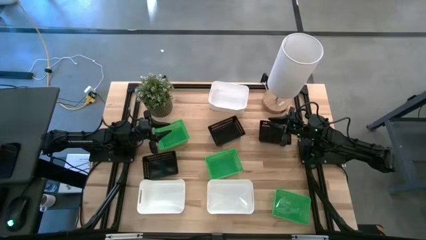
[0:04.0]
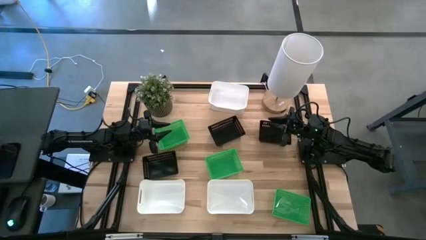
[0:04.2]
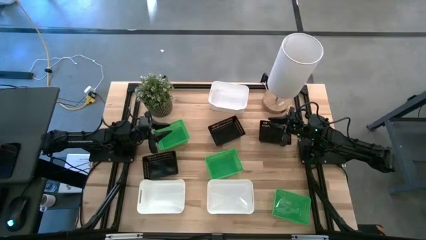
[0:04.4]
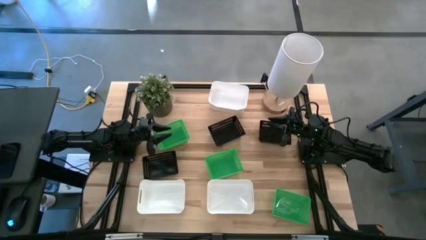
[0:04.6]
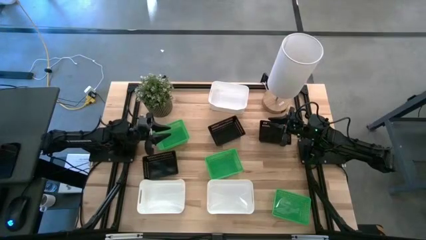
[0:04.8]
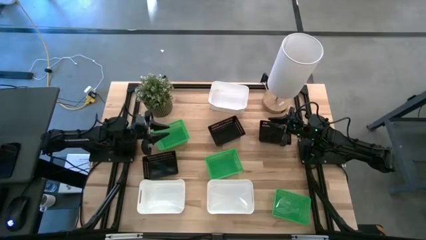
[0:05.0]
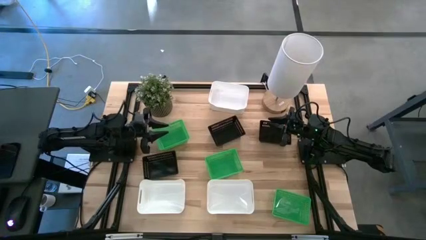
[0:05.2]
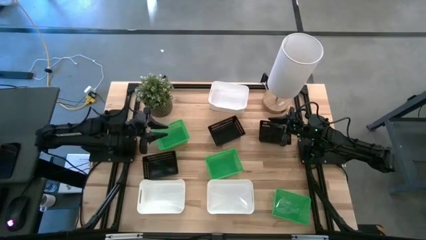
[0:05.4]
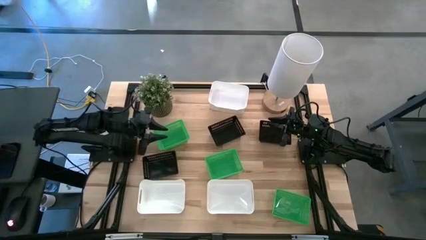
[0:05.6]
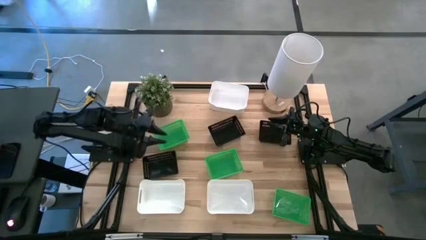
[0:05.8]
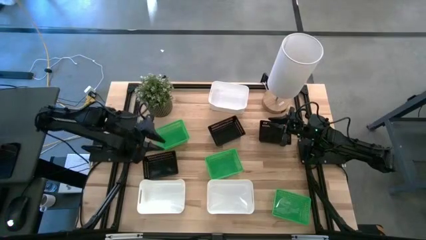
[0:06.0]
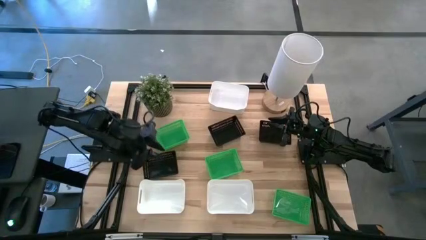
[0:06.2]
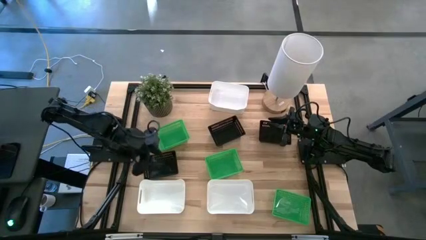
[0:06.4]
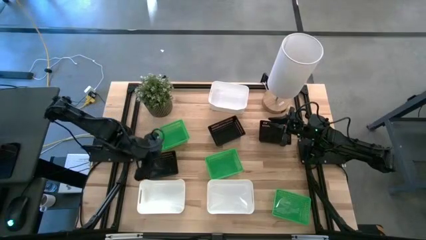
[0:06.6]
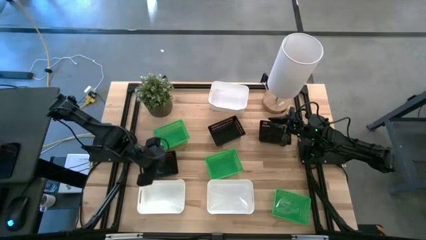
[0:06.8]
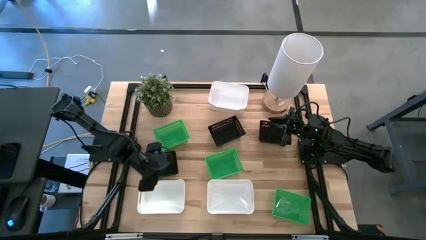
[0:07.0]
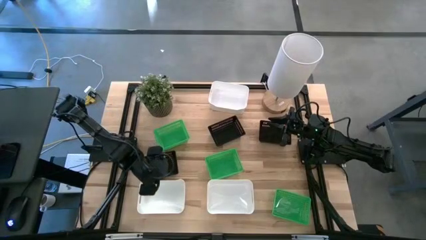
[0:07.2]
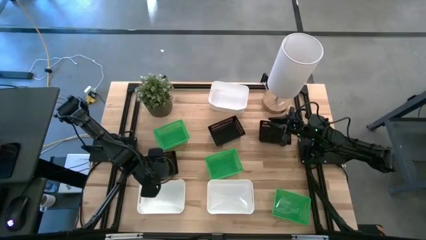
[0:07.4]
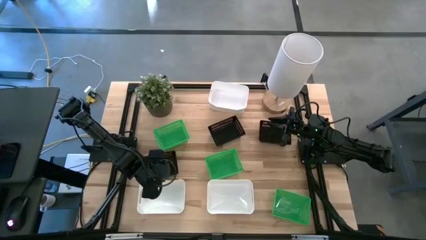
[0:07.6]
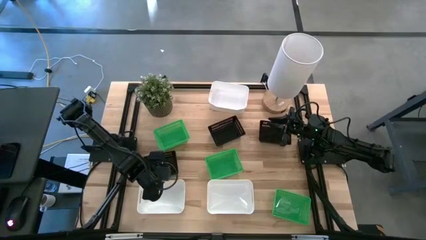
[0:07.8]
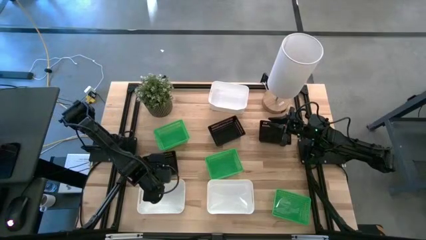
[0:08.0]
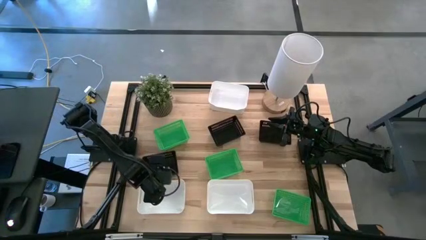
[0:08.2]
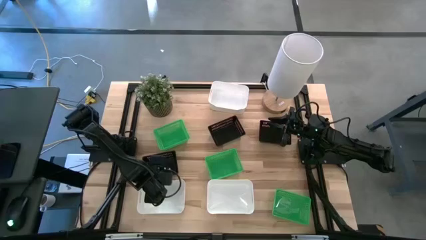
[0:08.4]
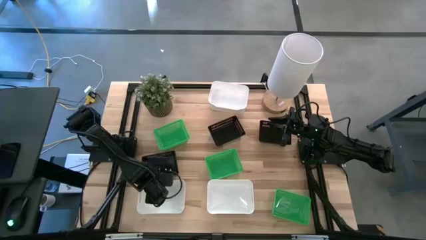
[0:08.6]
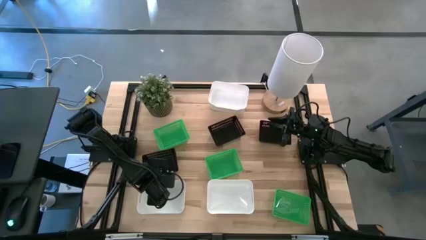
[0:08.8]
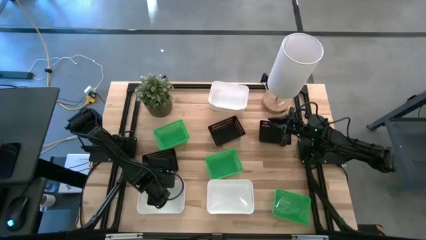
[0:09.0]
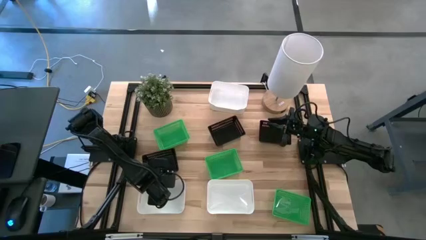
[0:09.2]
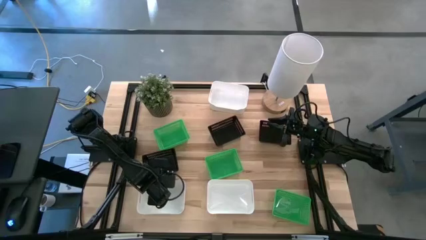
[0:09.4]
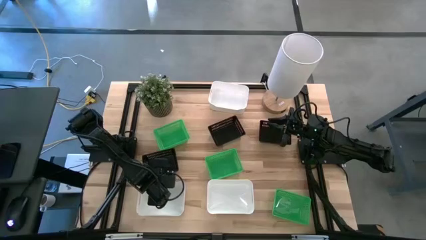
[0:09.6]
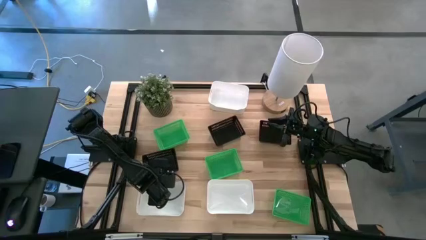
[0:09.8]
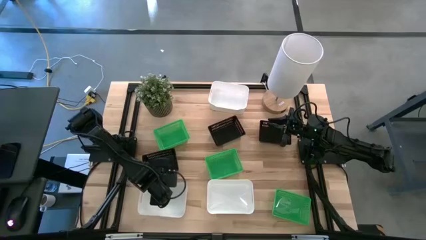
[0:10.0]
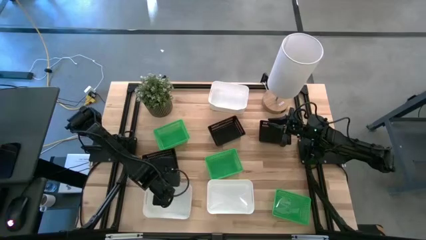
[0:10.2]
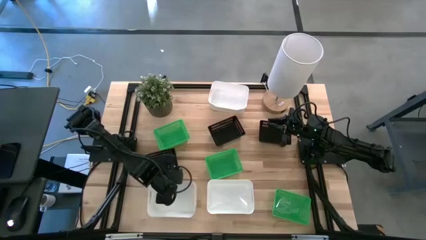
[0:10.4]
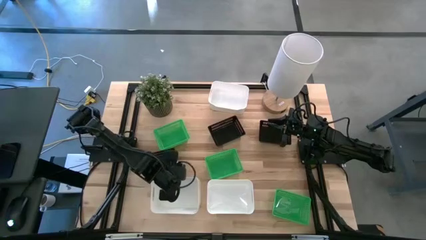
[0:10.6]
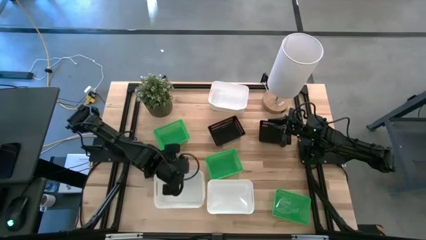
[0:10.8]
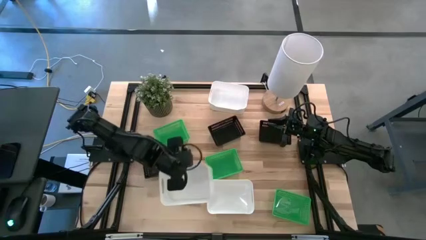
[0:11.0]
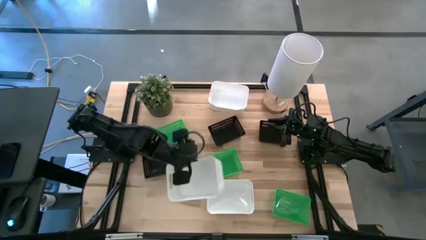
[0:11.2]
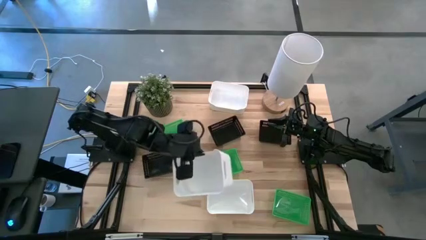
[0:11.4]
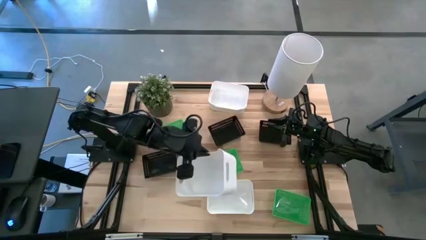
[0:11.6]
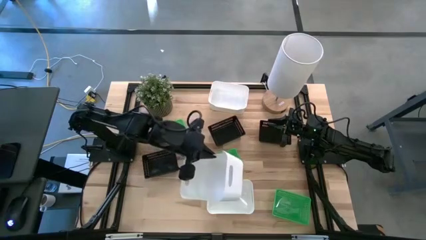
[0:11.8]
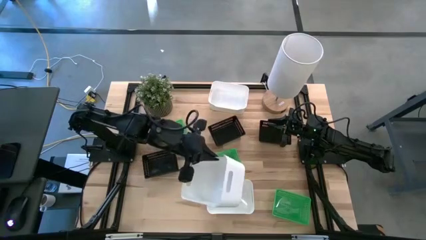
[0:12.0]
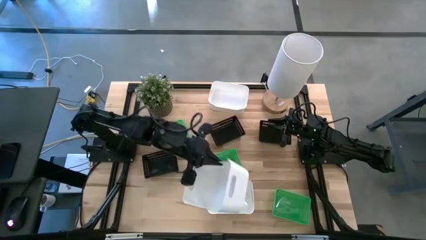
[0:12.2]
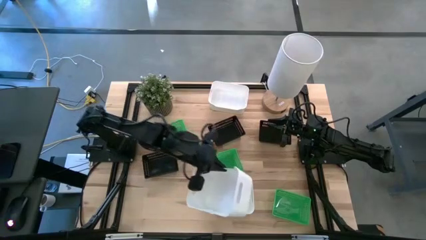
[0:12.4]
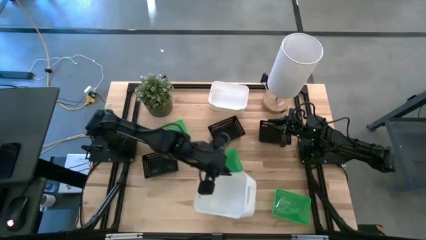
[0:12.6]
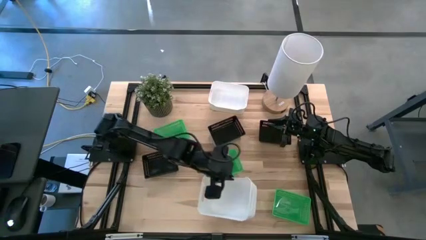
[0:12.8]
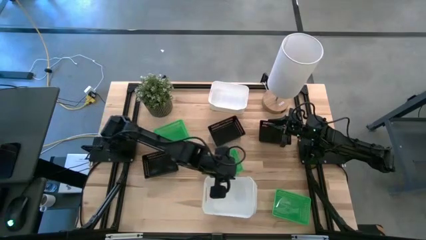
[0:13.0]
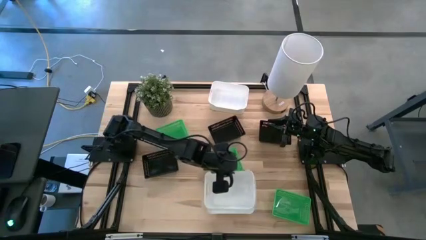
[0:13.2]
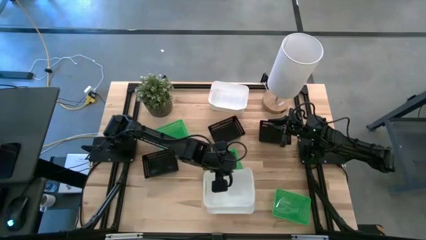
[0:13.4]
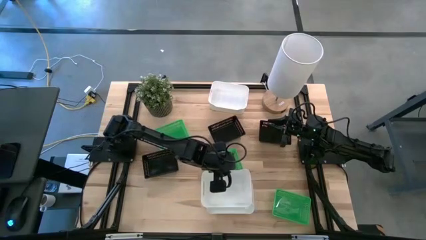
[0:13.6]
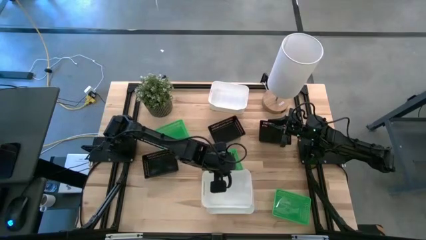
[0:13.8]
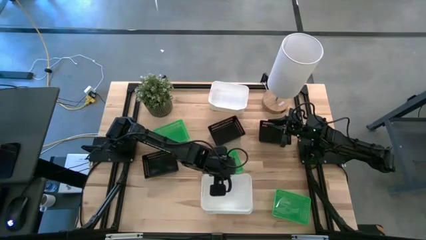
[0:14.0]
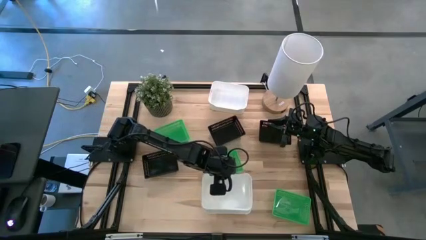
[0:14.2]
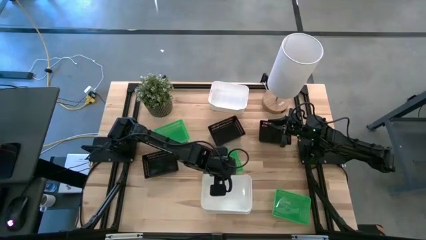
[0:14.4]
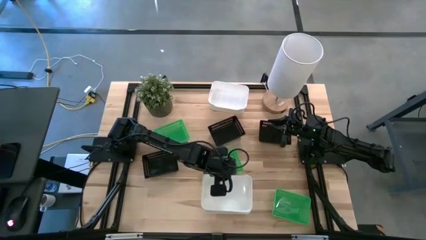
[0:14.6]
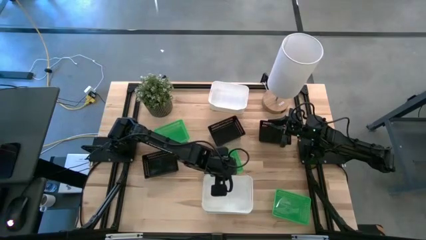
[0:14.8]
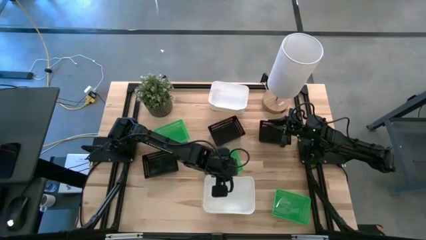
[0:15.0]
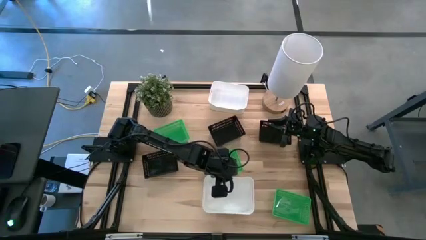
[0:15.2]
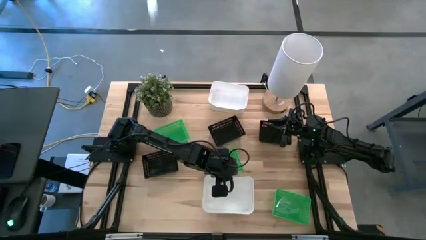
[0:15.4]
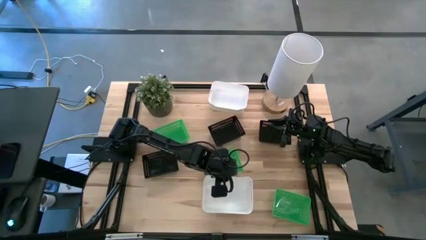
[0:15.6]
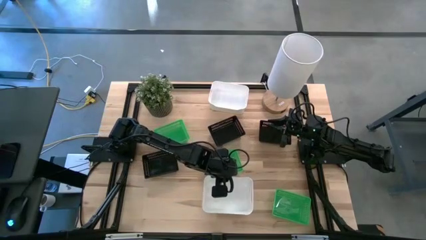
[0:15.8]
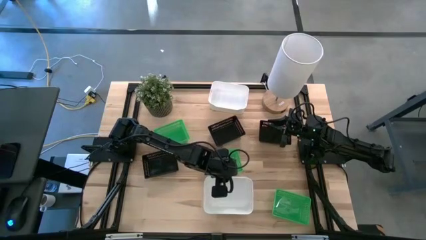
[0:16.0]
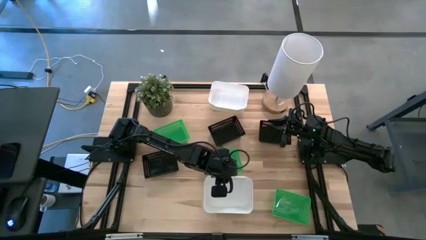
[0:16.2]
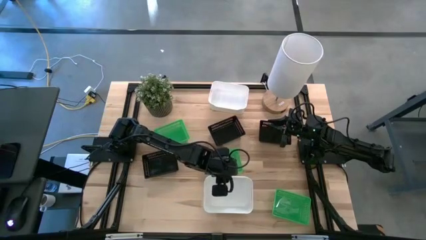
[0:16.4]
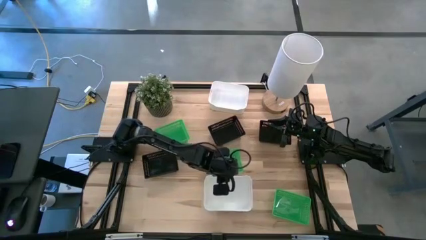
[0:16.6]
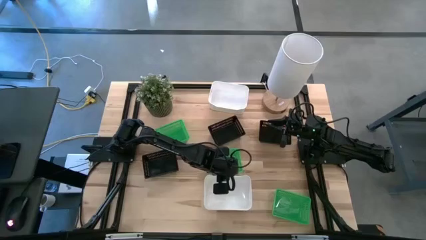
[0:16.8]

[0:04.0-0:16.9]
Stack the bottom left white bin on the bottom right white bin
